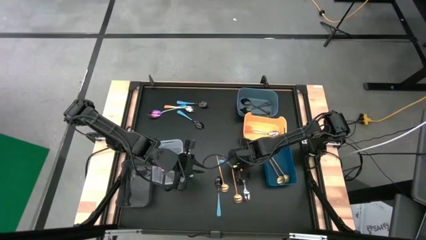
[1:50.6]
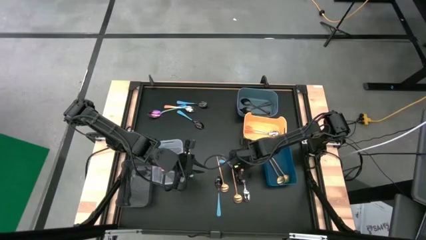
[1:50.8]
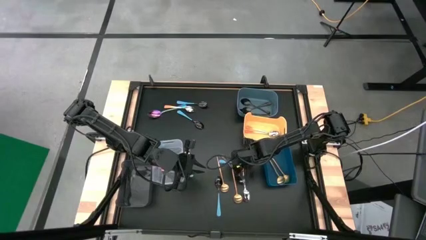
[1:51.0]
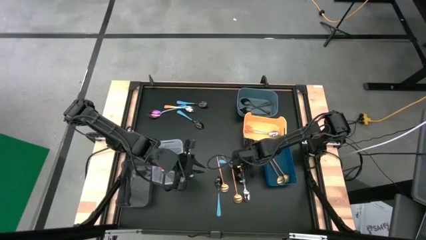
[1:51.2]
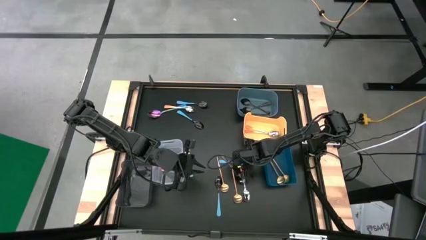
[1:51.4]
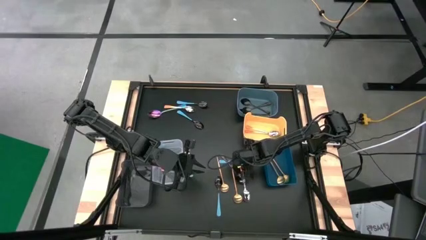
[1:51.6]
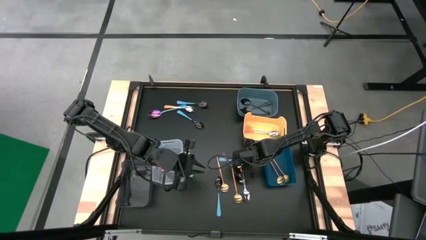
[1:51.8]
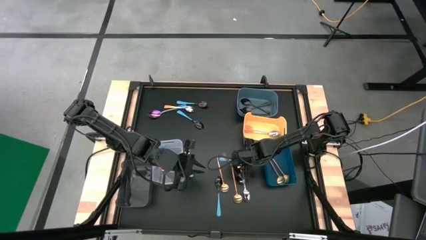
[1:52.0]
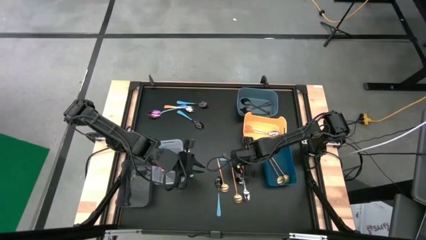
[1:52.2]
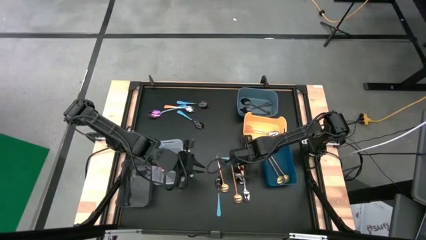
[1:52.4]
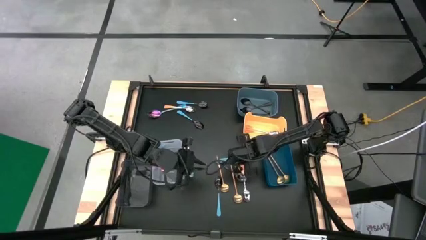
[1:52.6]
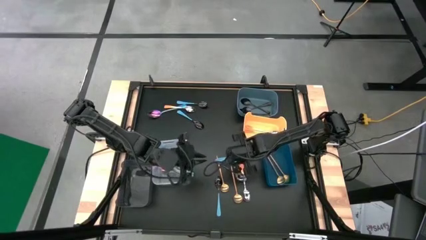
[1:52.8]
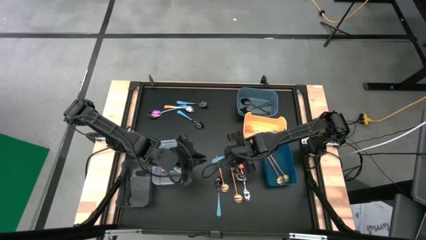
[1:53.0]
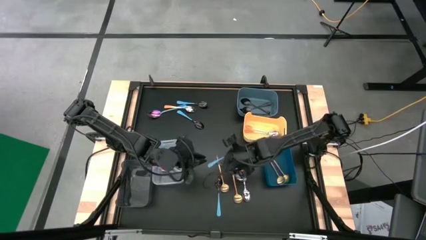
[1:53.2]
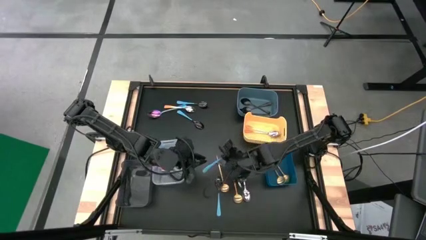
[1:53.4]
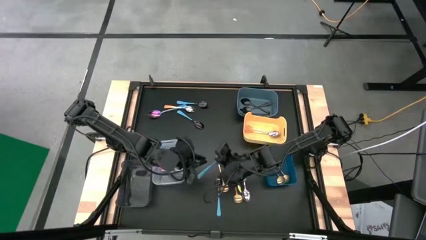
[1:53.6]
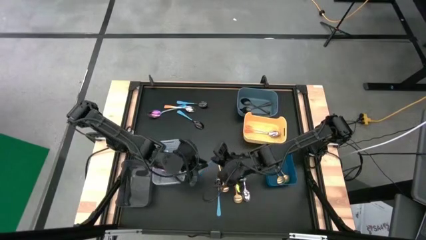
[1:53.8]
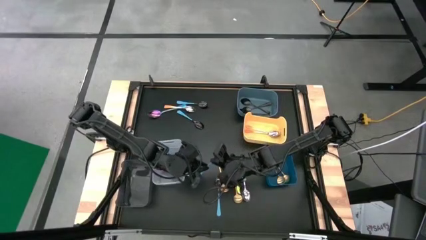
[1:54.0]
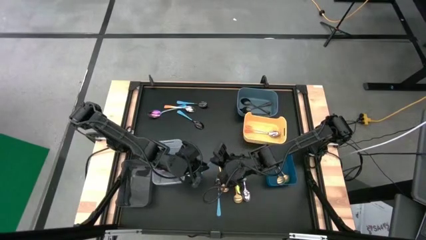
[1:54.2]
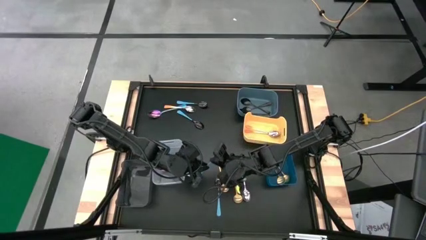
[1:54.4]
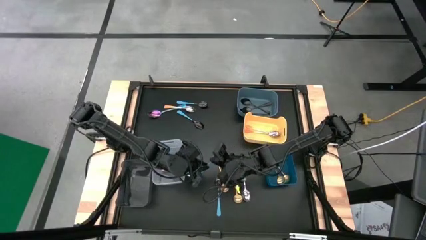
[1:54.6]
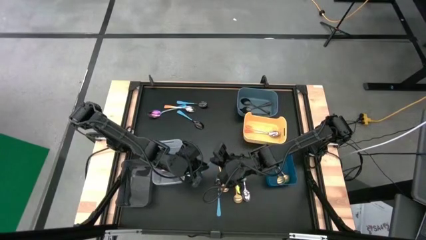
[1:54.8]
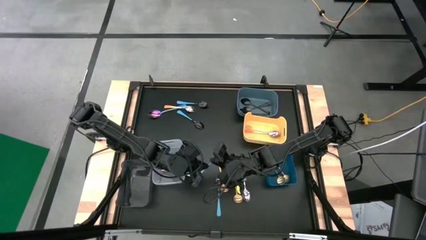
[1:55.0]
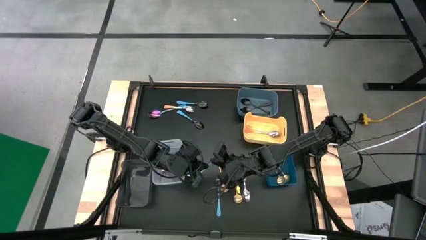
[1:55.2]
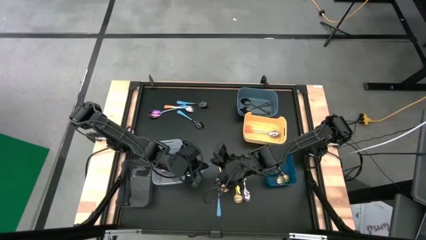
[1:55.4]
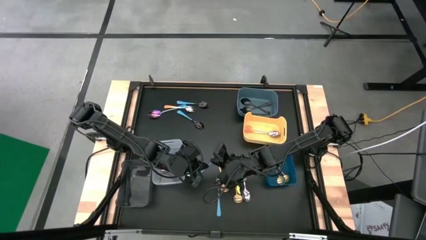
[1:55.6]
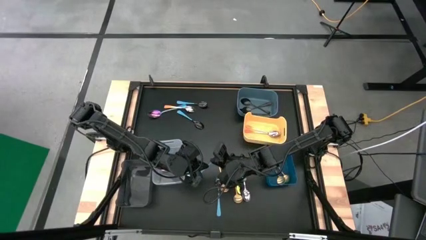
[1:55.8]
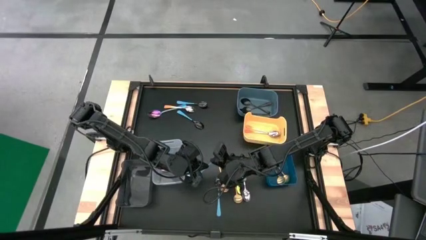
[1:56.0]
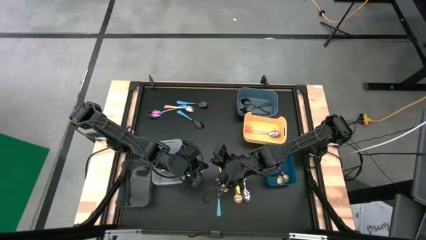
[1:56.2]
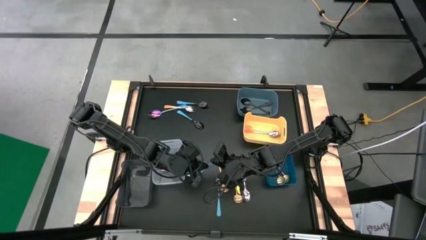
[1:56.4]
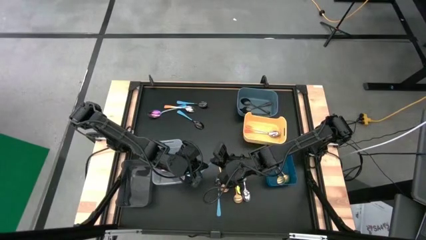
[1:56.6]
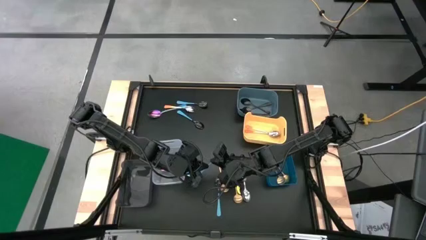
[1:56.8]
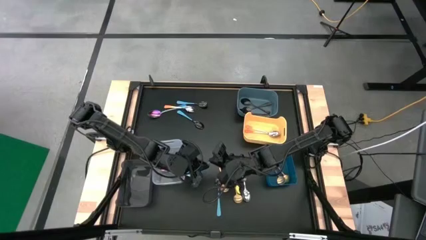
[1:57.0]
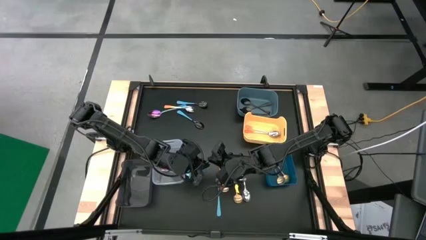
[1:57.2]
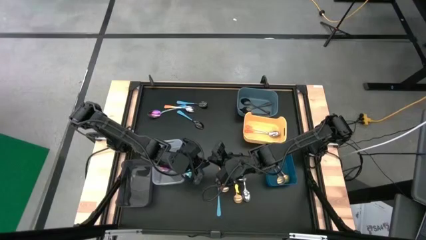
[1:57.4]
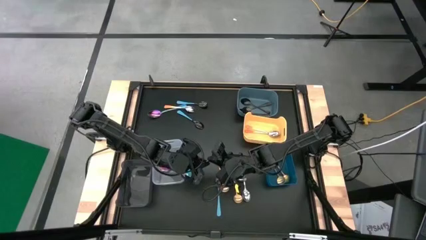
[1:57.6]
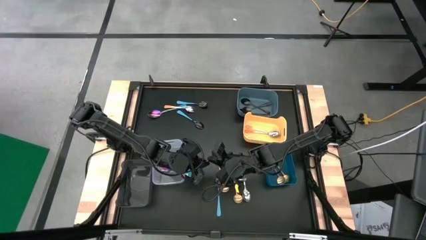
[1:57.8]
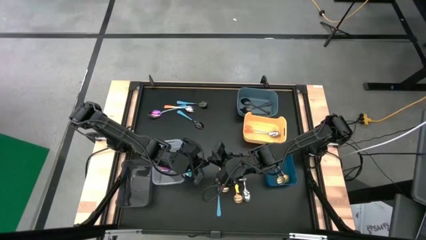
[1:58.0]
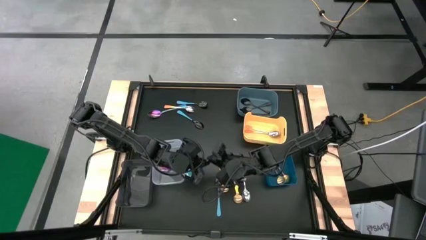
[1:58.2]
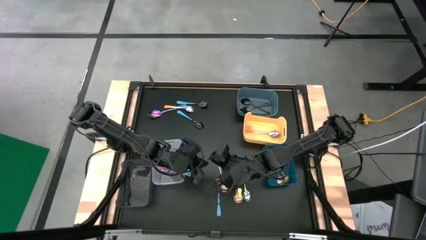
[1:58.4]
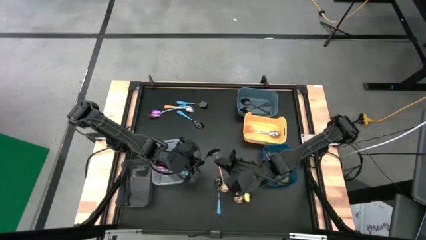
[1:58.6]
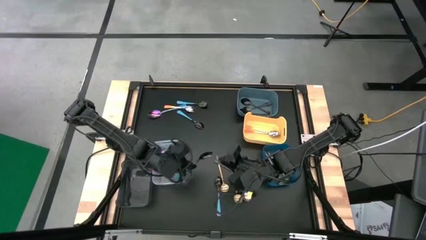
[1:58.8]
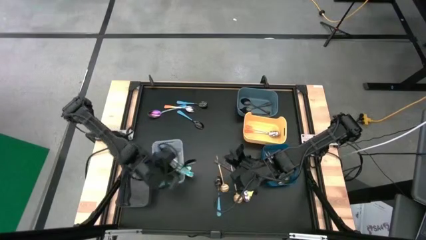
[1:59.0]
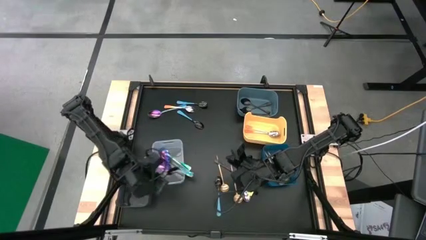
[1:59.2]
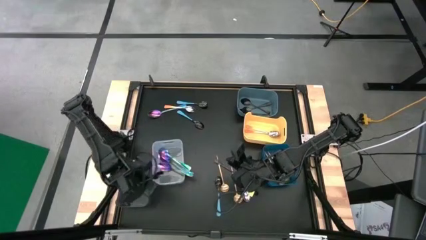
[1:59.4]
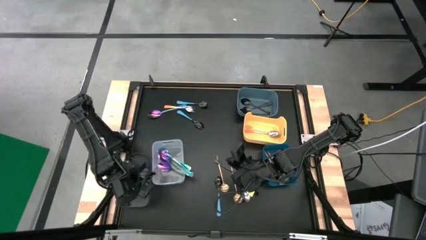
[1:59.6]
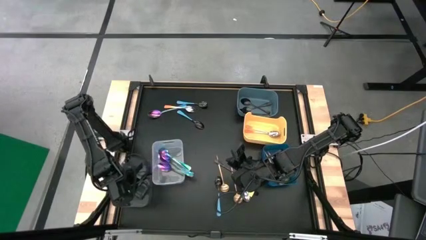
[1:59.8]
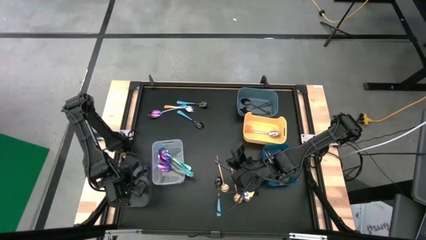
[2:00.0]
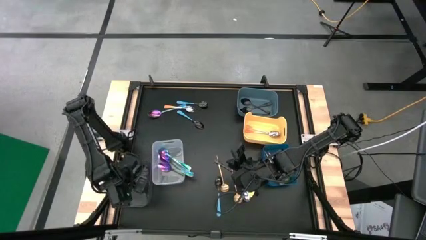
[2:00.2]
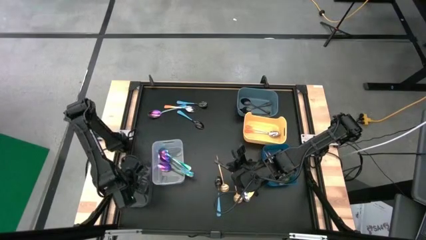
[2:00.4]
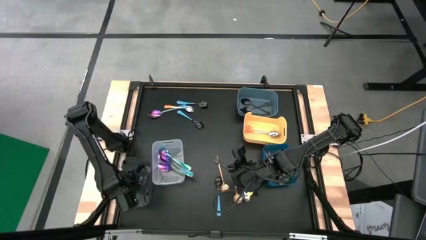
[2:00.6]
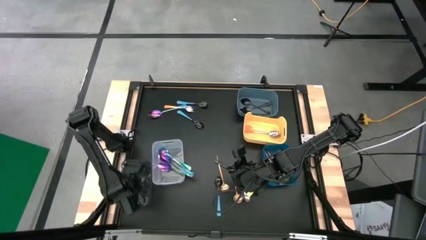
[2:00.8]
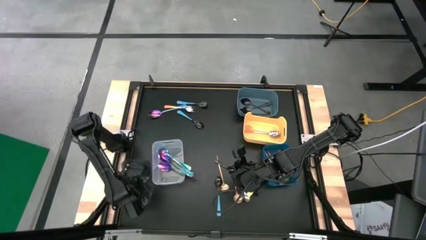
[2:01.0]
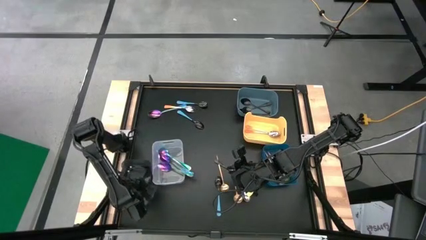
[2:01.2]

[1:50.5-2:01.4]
Task: Sort silverware by color (type)
Put the light blue spoon into the black bin

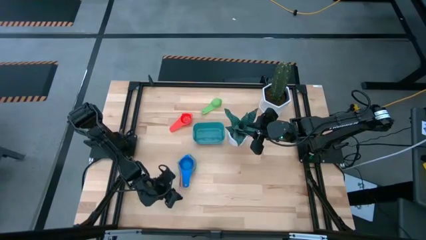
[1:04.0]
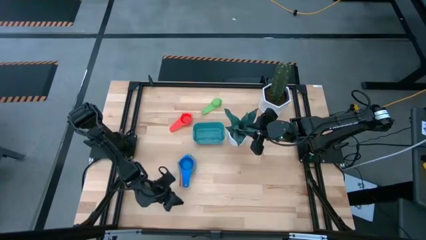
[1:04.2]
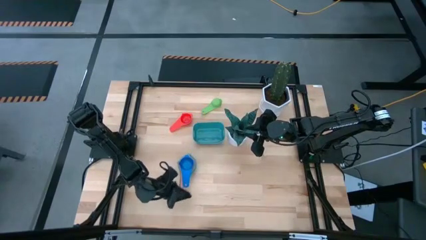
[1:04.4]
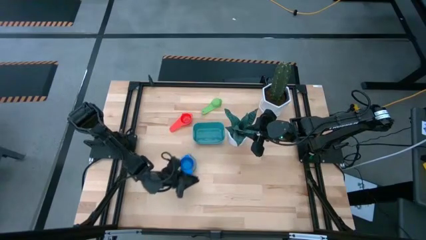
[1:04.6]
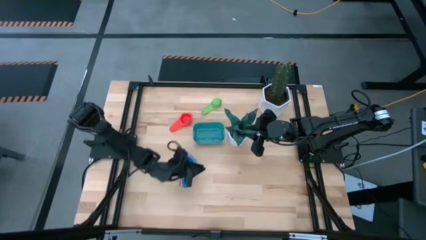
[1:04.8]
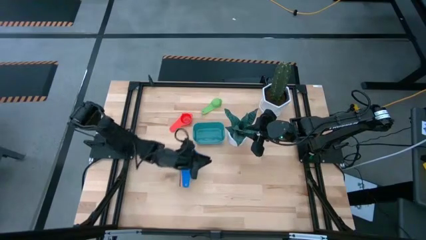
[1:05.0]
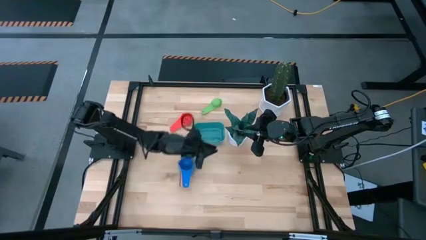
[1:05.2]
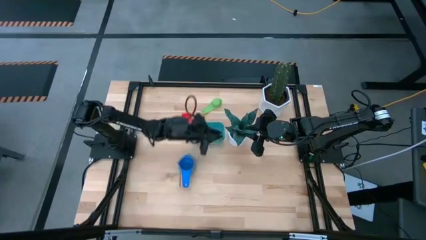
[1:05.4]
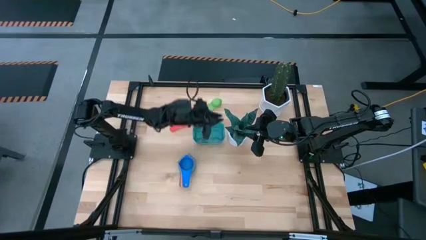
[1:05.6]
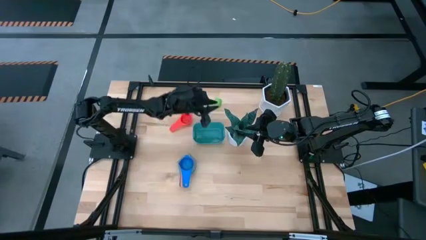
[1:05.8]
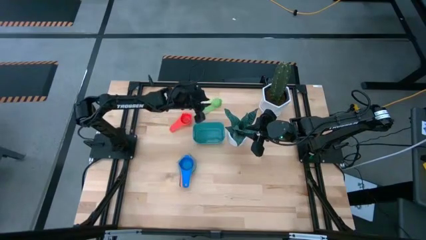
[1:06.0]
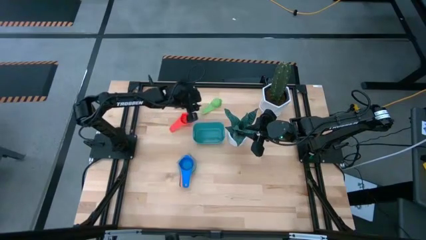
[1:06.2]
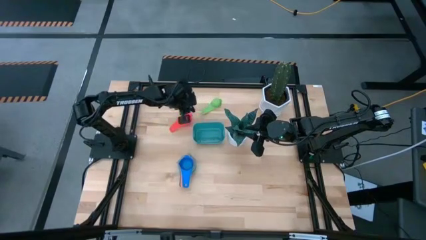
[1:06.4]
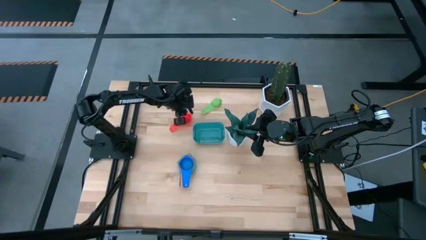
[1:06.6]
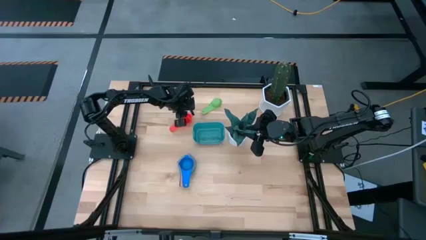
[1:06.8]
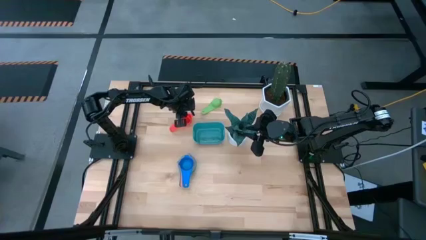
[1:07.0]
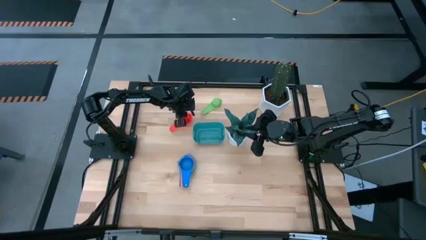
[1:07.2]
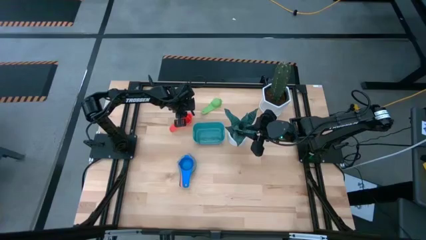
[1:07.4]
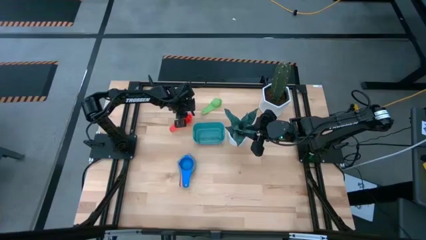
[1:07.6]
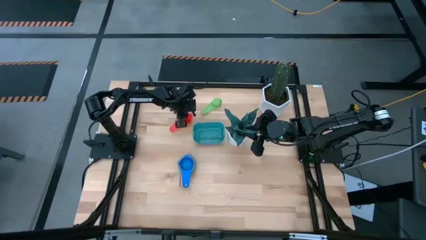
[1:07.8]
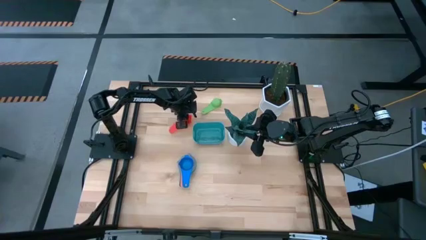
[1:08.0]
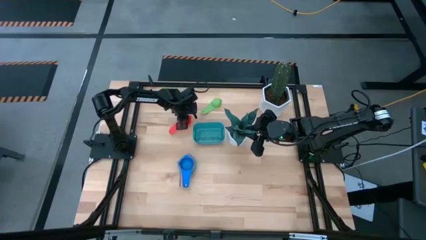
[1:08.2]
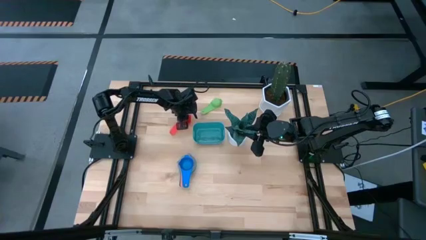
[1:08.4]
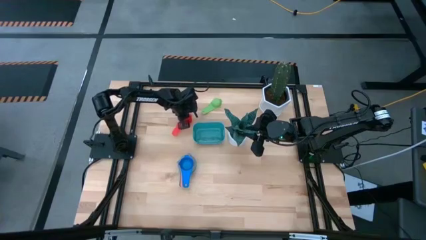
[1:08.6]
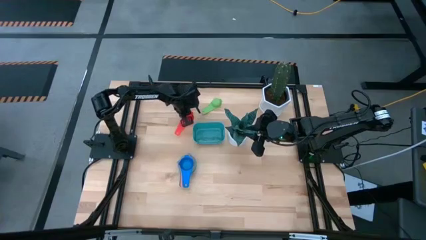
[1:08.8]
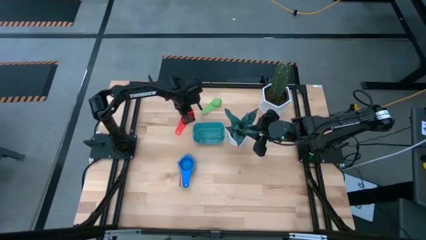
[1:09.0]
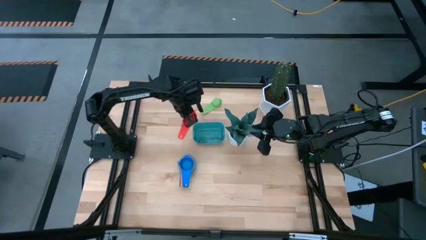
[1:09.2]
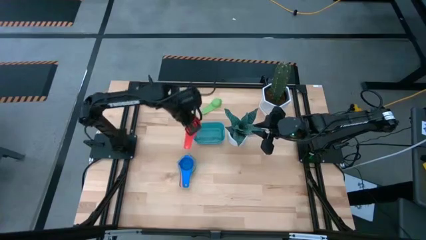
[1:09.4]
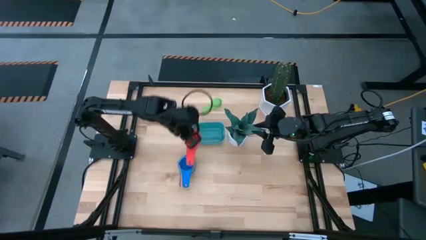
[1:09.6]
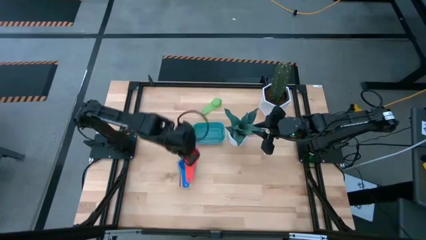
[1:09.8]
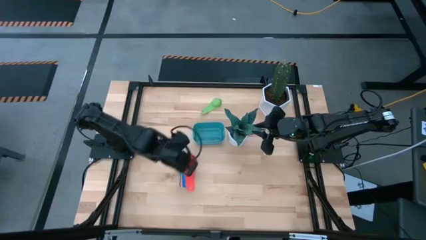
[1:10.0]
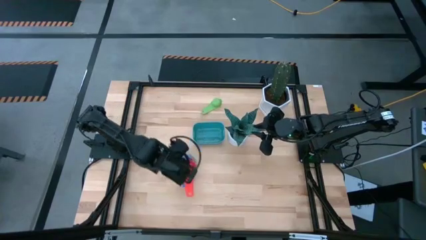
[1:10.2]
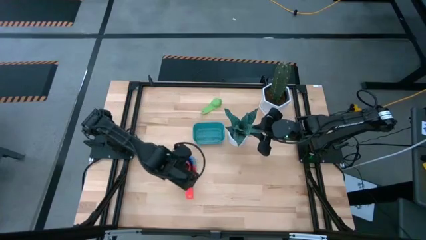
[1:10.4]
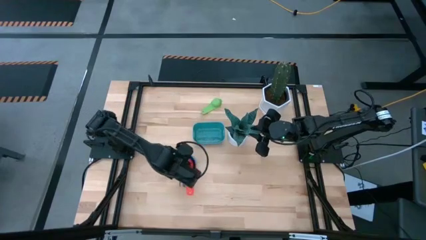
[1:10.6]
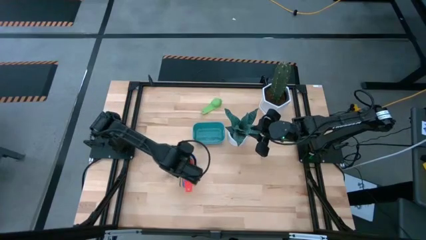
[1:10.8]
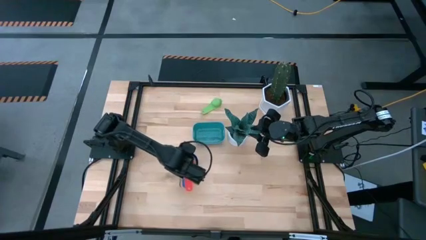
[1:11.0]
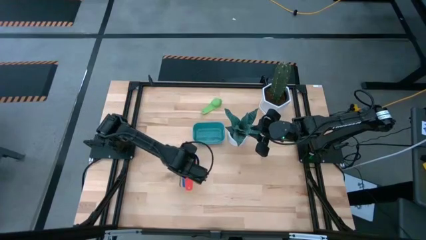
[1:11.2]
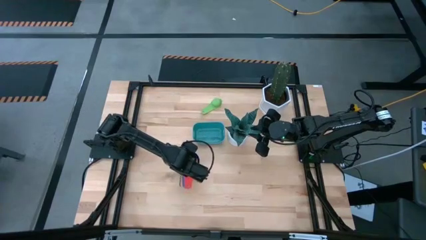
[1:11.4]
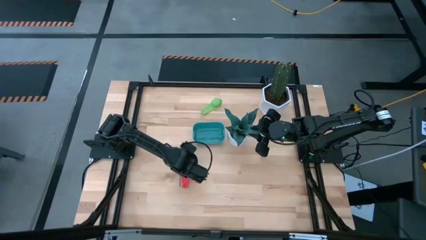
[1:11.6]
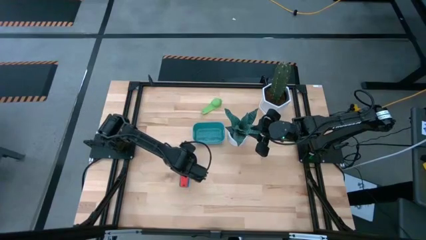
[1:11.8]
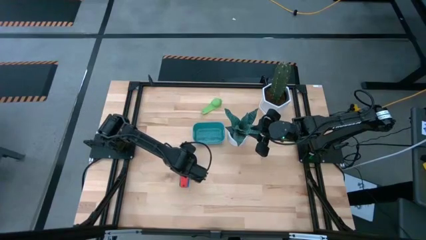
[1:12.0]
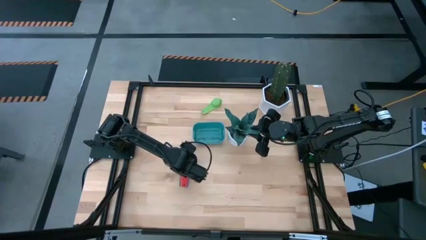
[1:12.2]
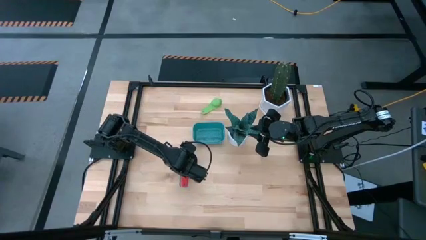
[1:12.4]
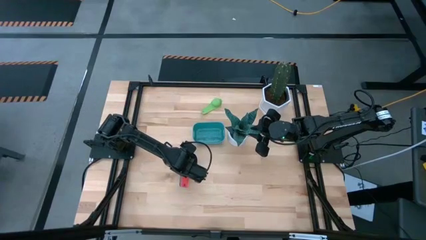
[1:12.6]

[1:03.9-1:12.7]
Task: Nest measuring cups in basket
Stack the red measuring cup on top of the blue measuring cup
